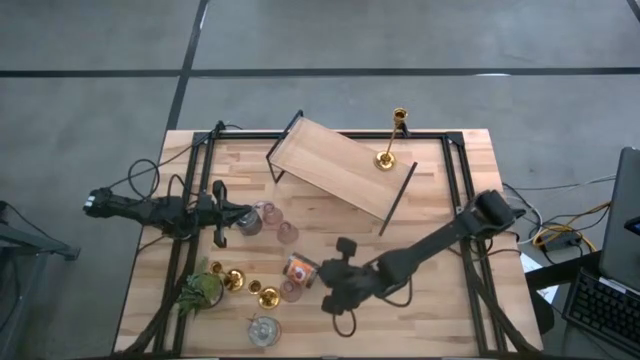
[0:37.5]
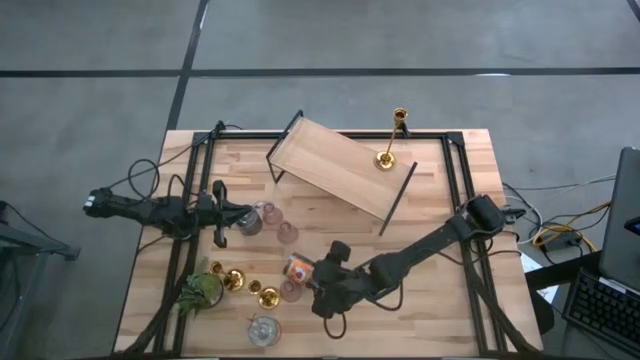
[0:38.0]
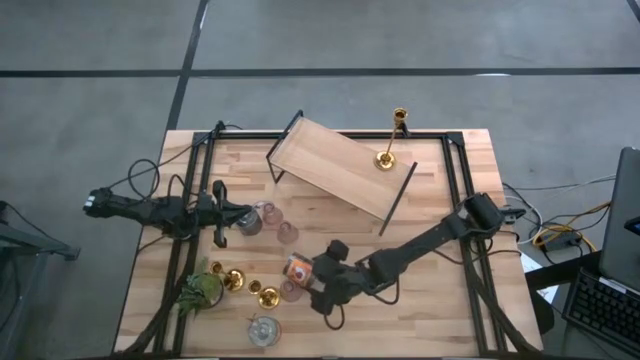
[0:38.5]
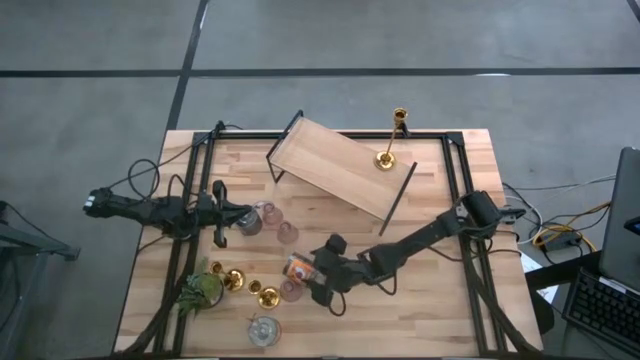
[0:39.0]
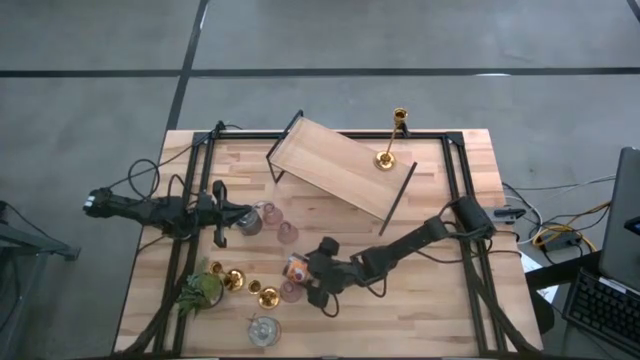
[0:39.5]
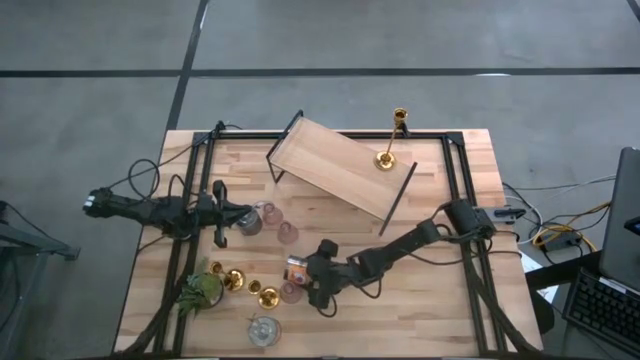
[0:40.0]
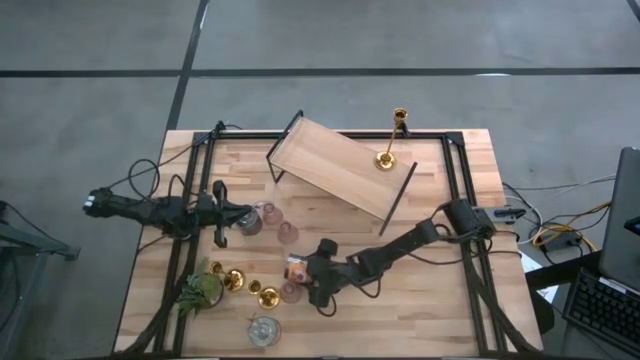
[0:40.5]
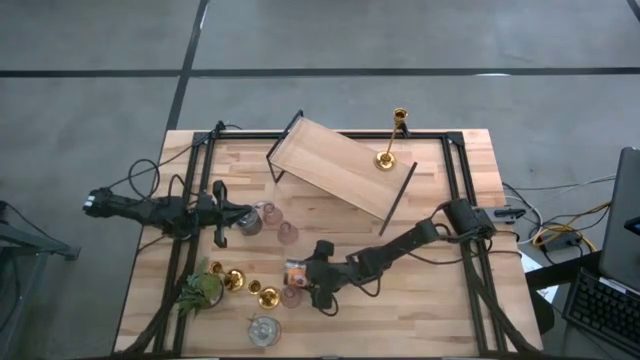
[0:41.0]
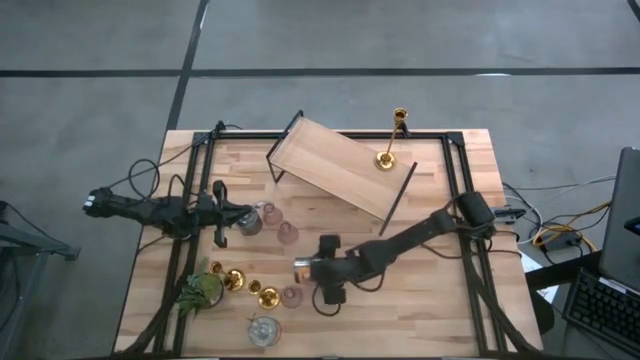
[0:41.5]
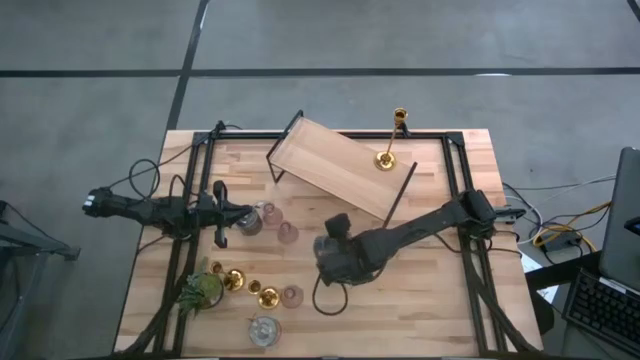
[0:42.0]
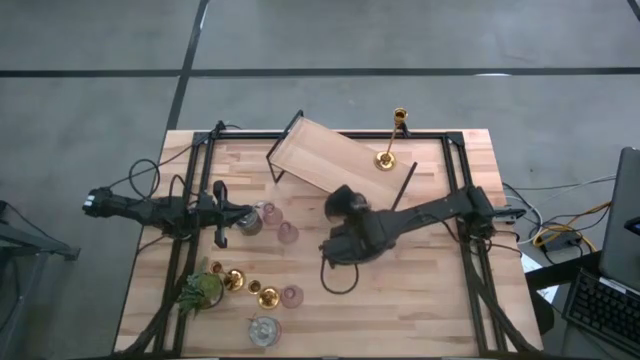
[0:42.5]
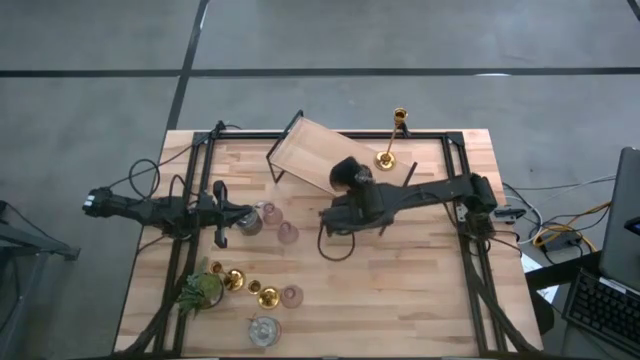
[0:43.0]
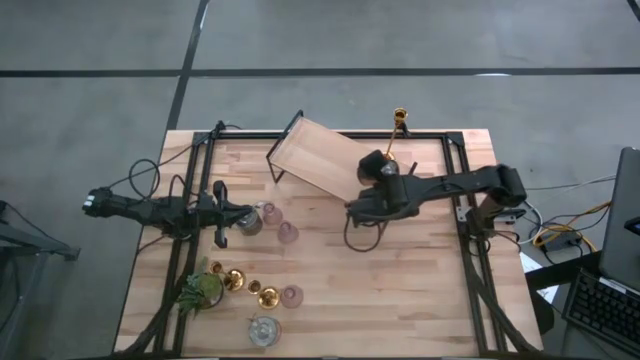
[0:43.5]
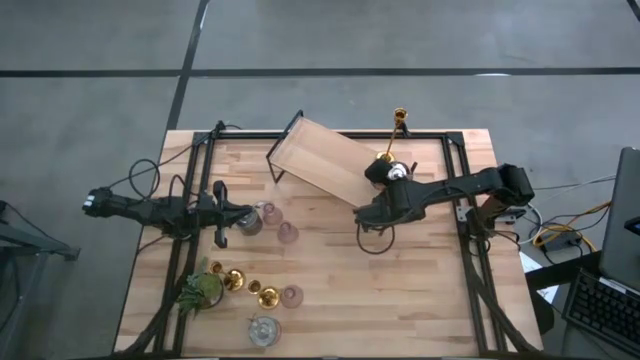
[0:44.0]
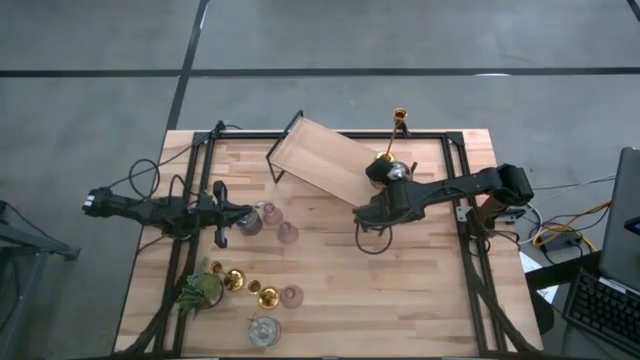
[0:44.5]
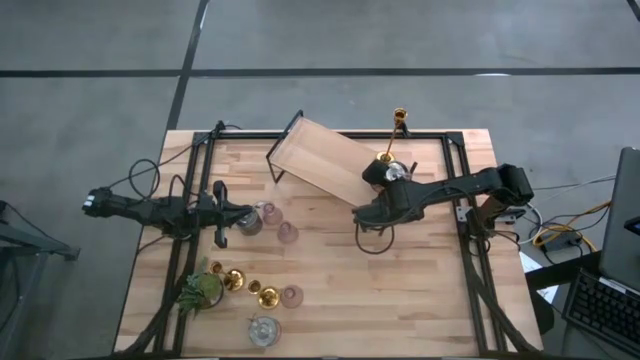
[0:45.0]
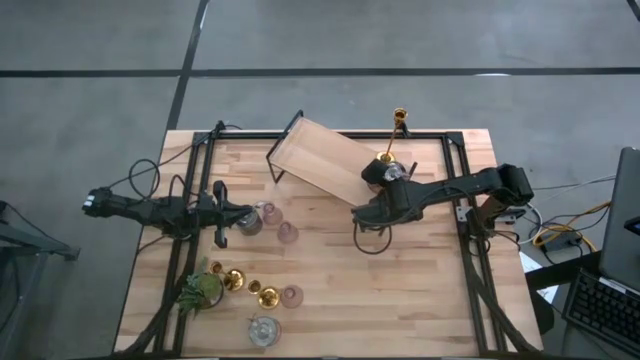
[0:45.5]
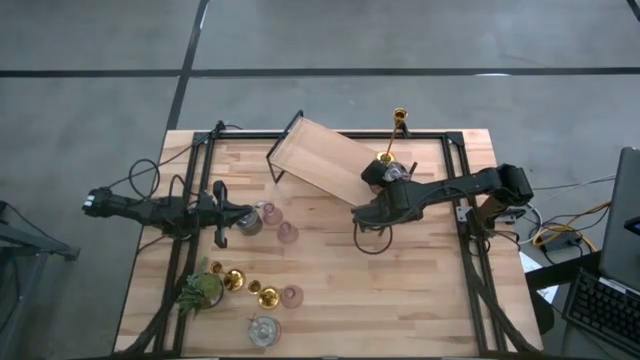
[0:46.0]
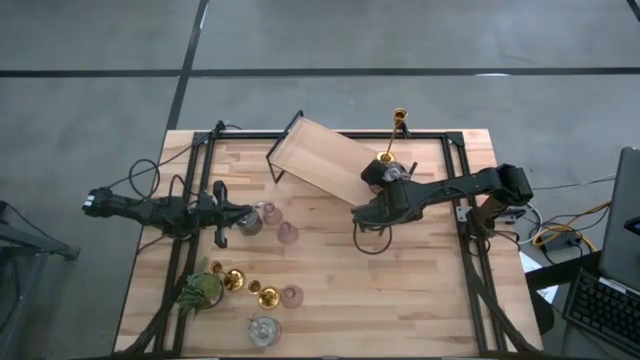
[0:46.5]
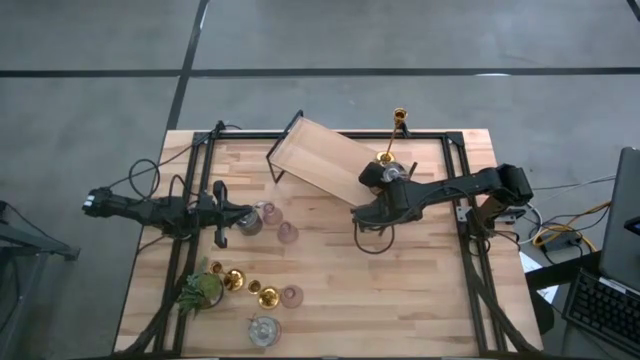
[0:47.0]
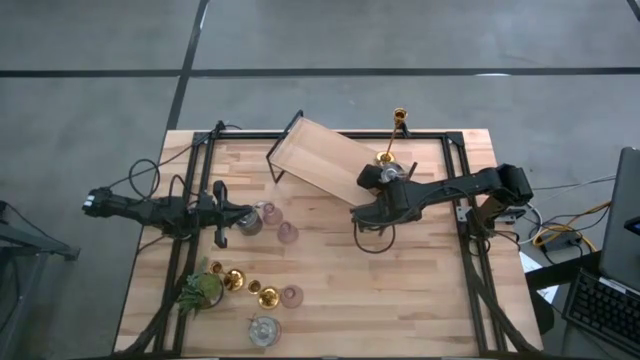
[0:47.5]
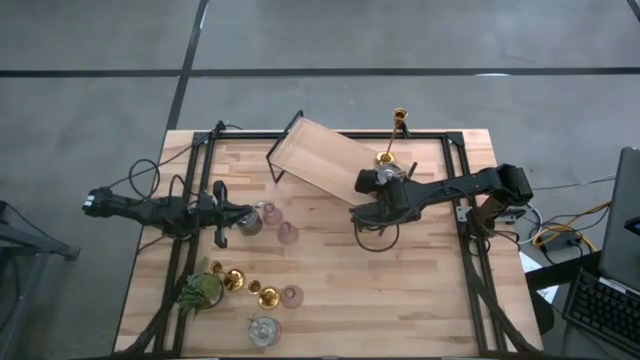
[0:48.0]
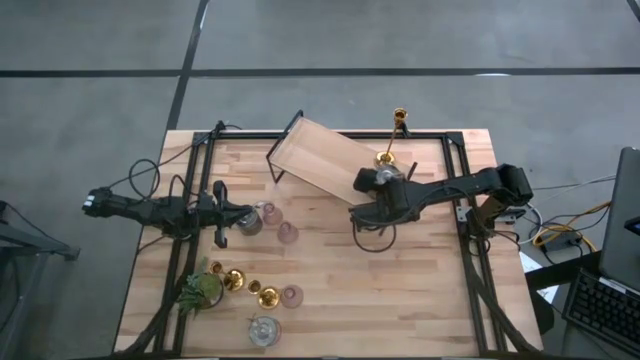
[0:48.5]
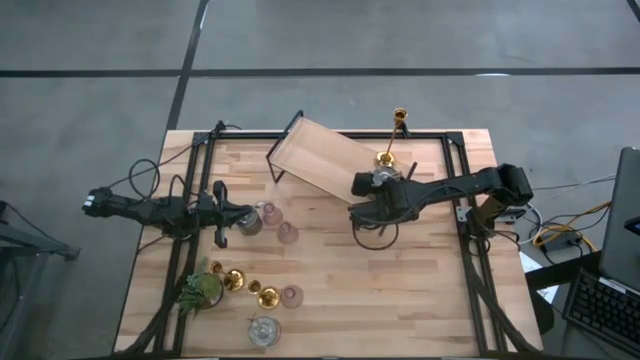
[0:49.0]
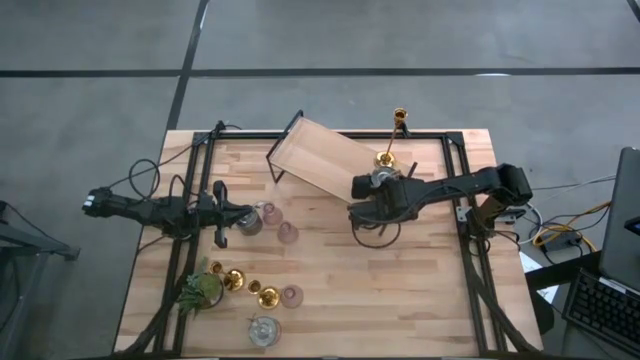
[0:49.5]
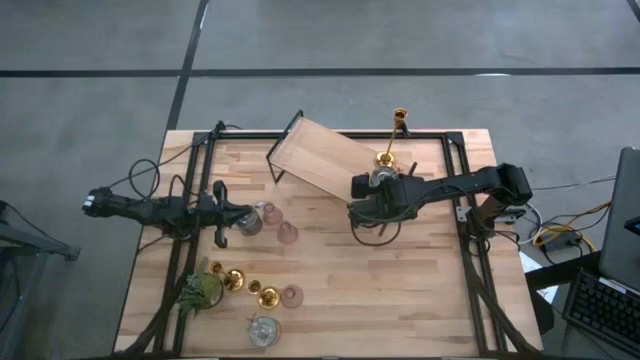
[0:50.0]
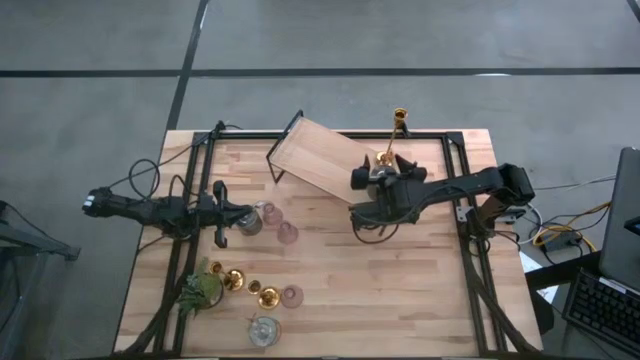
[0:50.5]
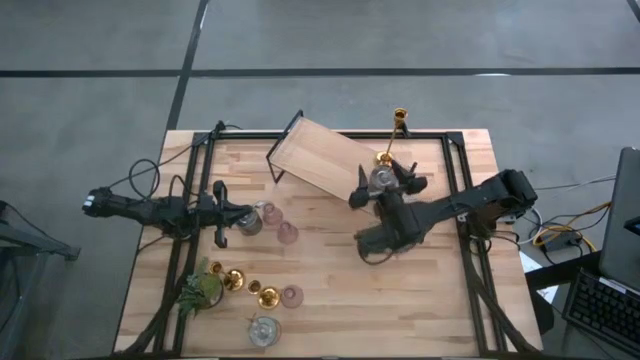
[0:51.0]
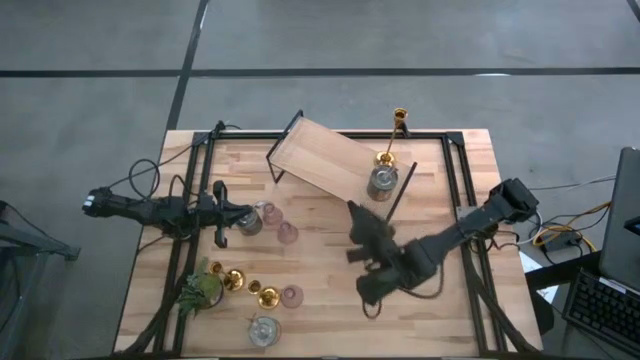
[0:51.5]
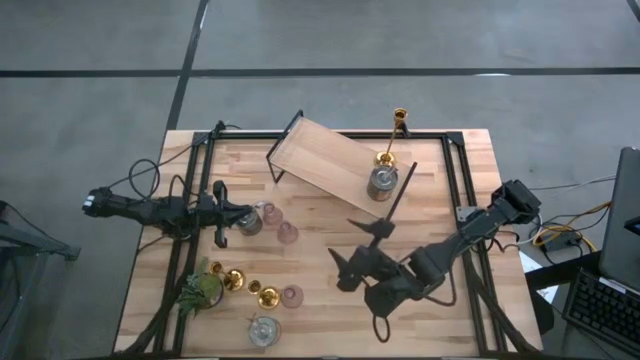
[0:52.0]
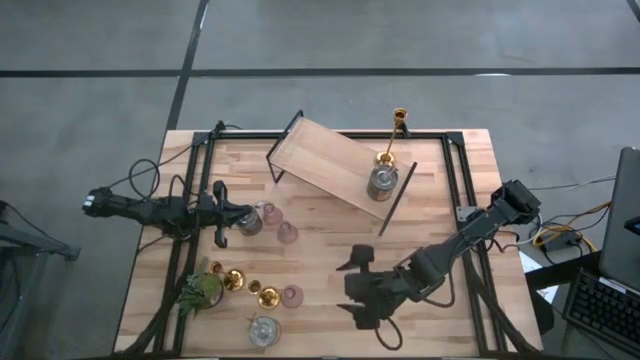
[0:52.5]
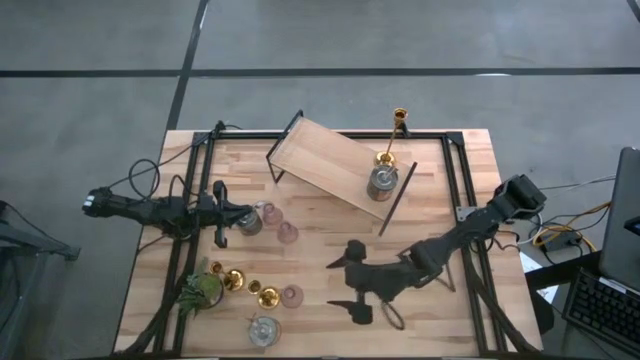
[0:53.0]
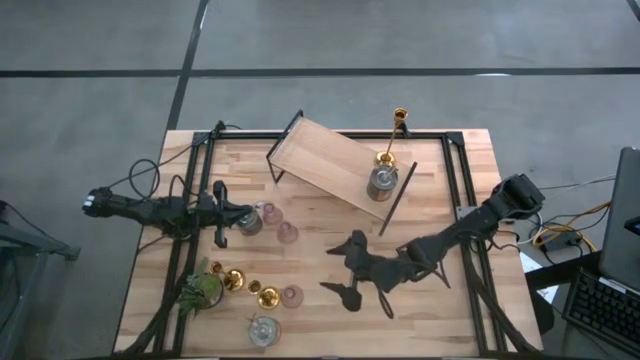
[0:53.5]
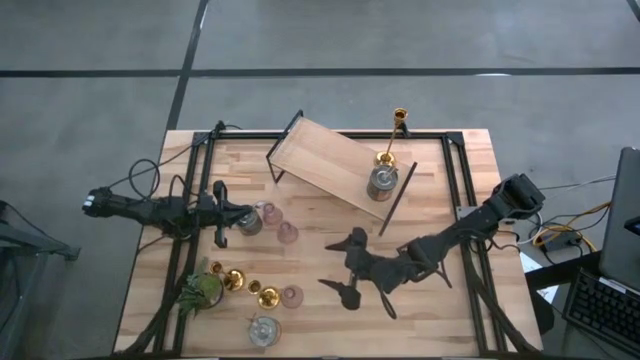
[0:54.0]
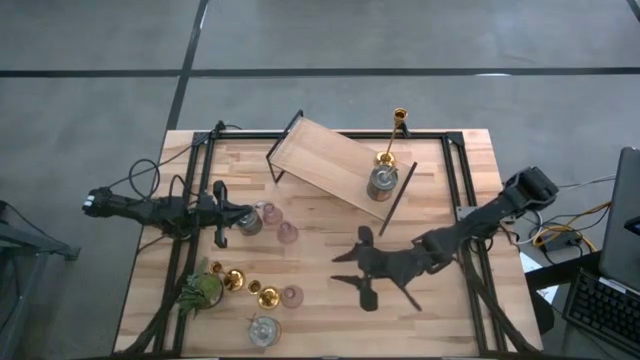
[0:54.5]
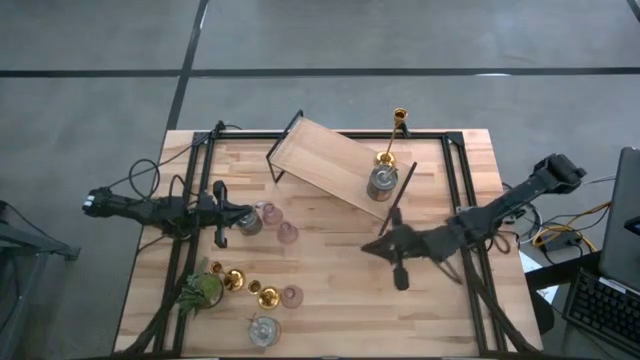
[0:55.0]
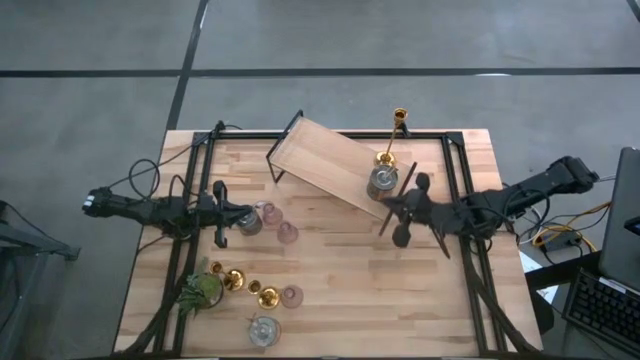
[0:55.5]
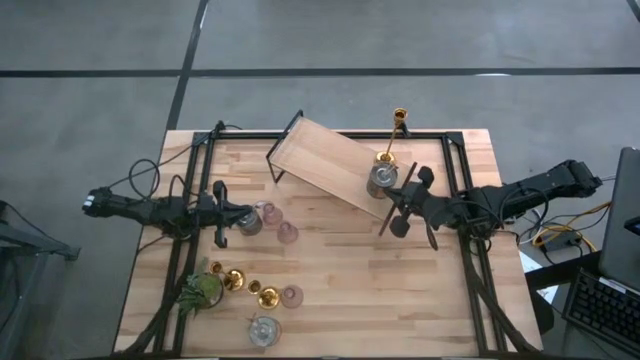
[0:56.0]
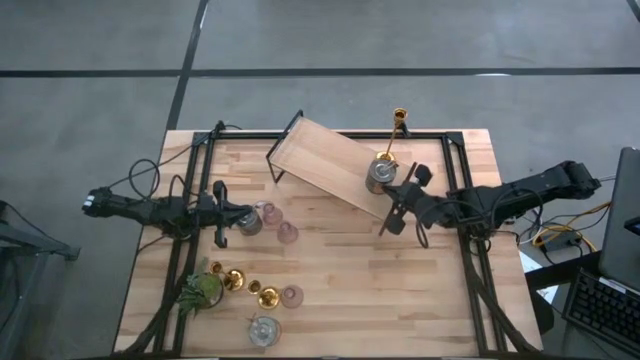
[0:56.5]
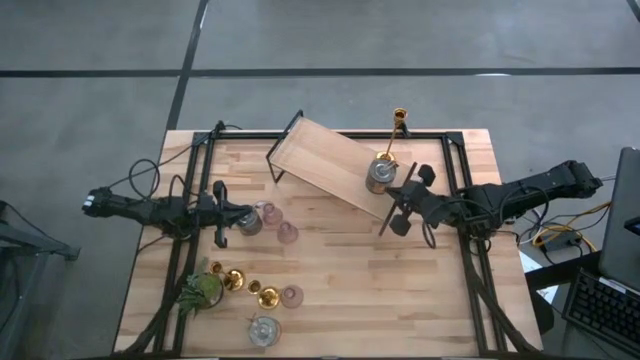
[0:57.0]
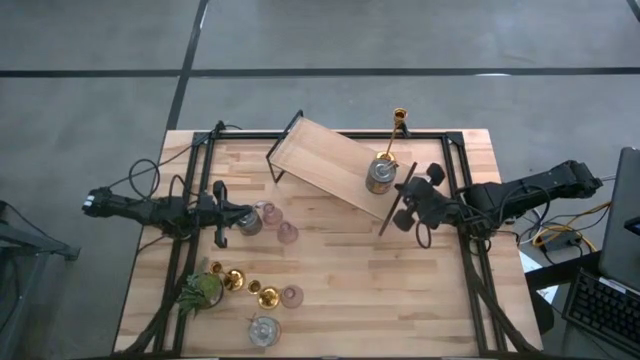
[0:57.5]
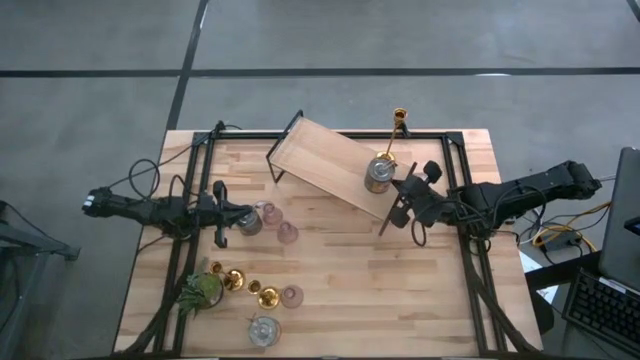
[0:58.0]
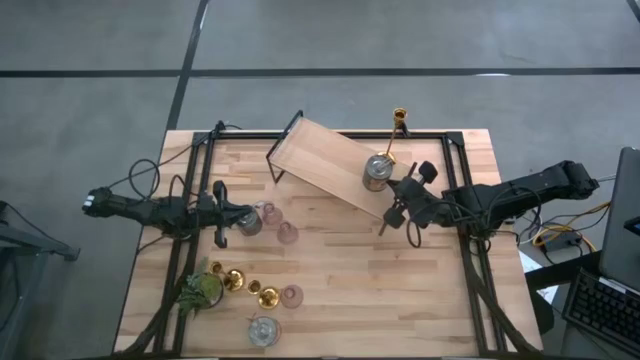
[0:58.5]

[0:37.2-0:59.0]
Task: Pick & Place candle stick holders
Put the bottom right silver scented candle on the shelf

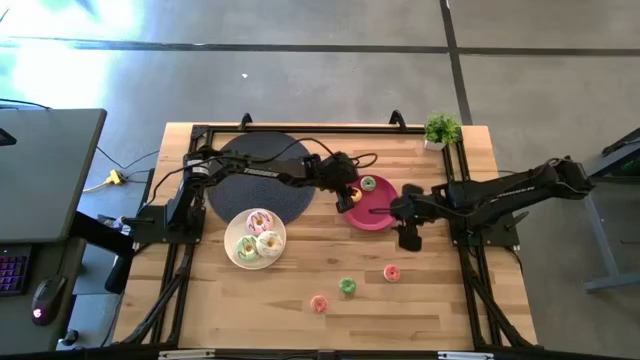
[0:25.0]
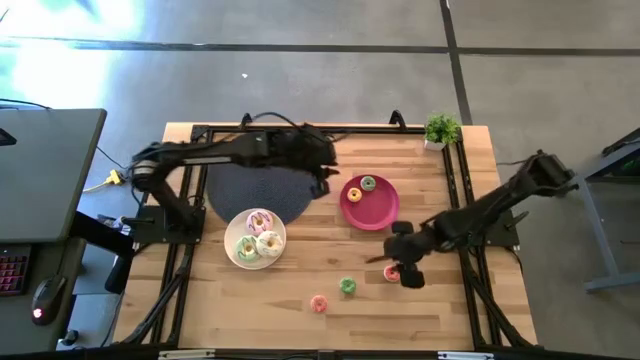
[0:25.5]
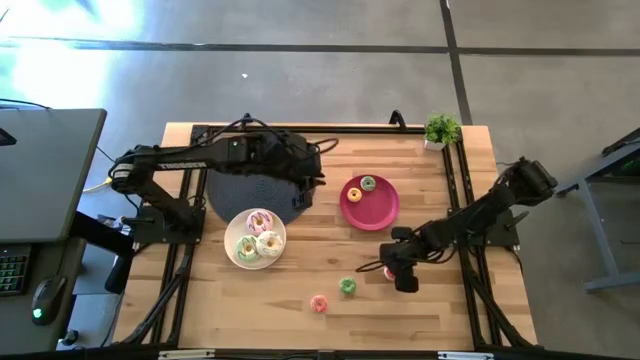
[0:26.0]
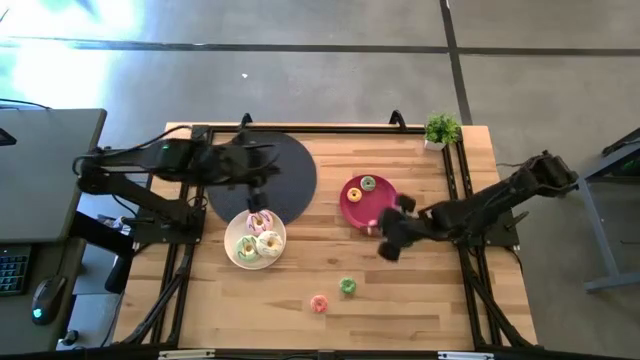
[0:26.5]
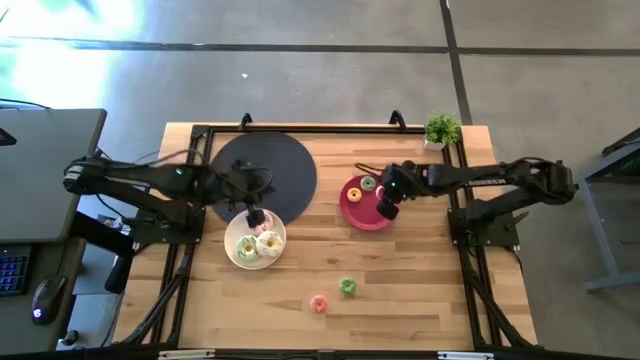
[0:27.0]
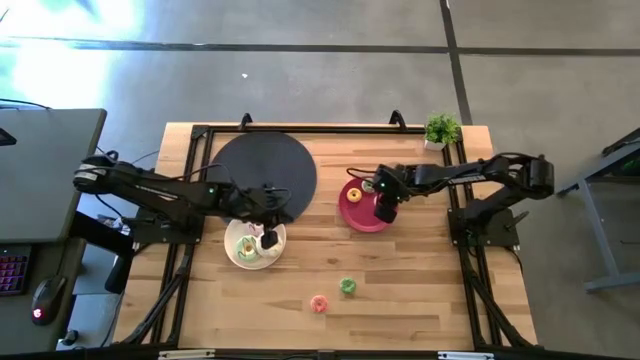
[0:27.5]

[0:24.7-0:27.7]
Task: Pick & Place donuts
Put the right small pink donut on the red plate
